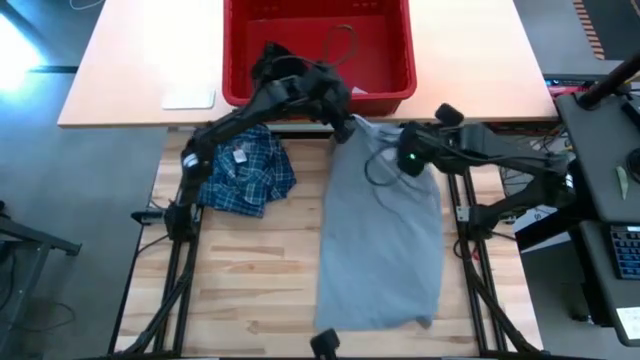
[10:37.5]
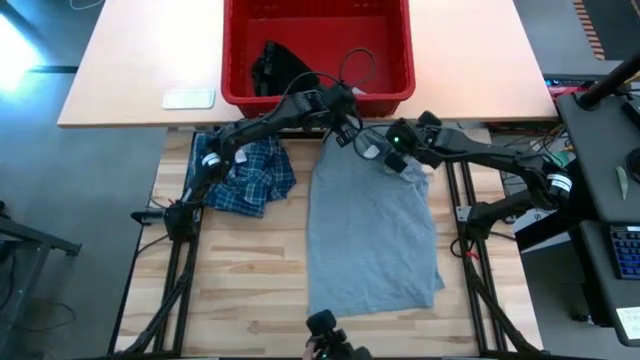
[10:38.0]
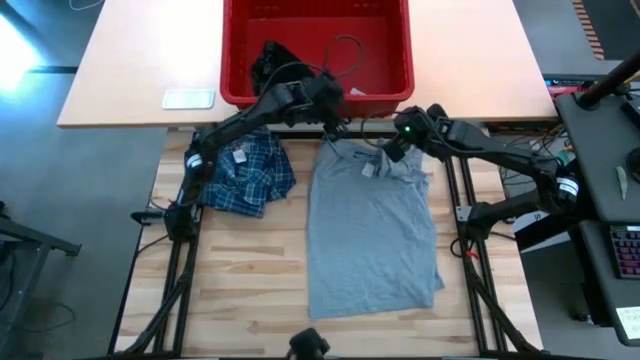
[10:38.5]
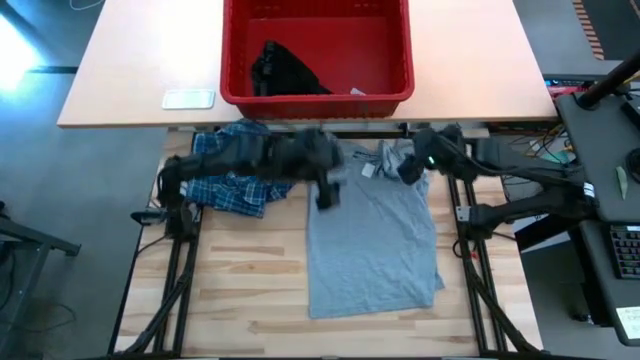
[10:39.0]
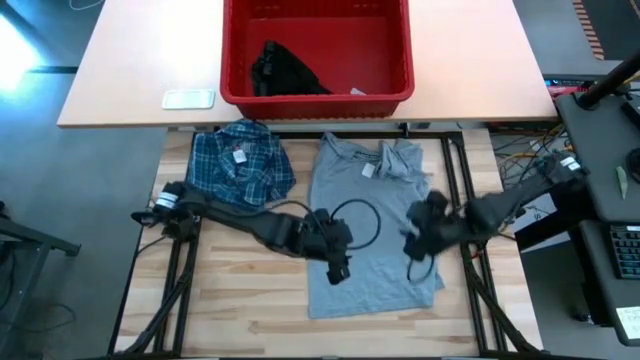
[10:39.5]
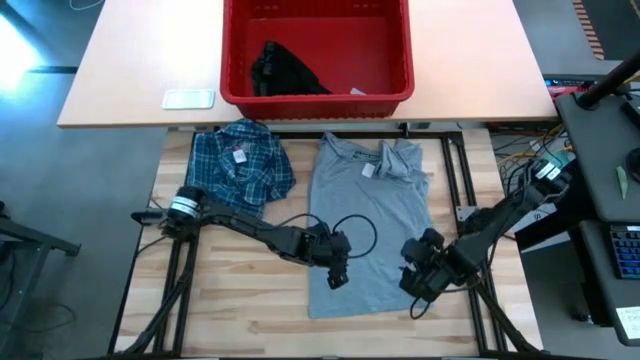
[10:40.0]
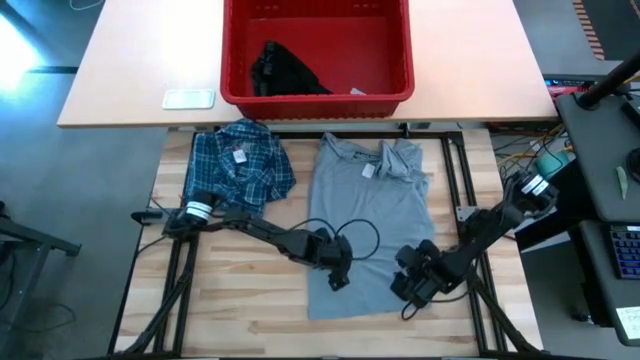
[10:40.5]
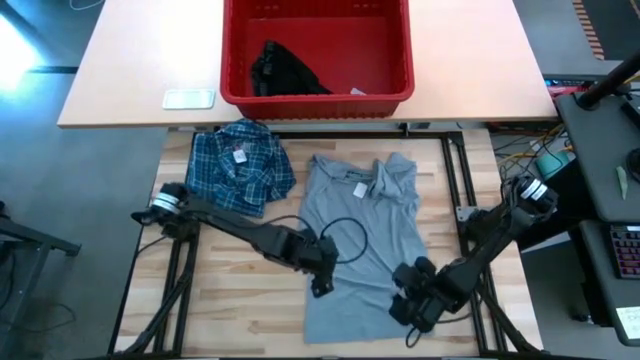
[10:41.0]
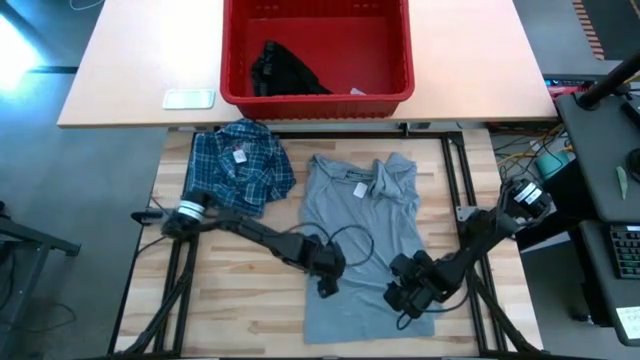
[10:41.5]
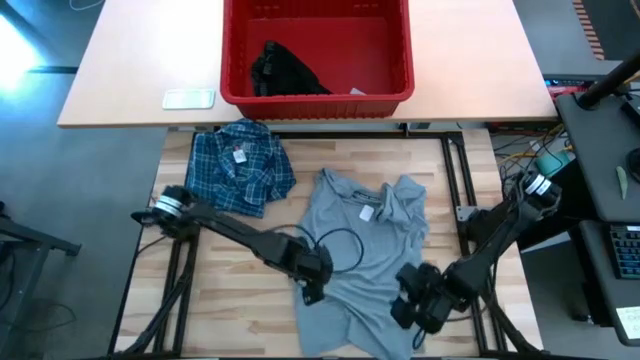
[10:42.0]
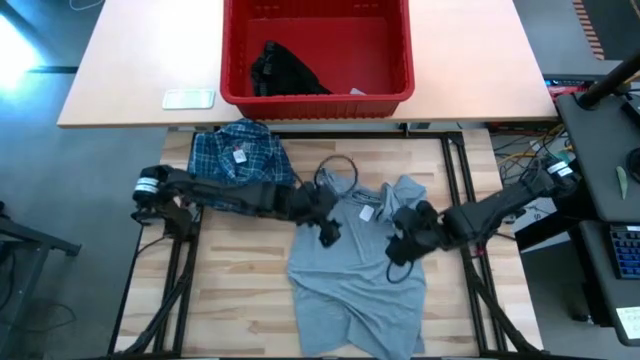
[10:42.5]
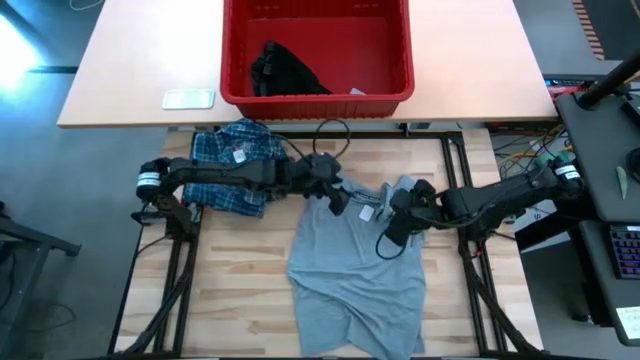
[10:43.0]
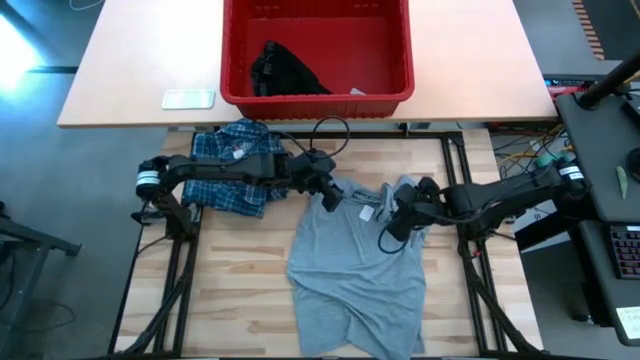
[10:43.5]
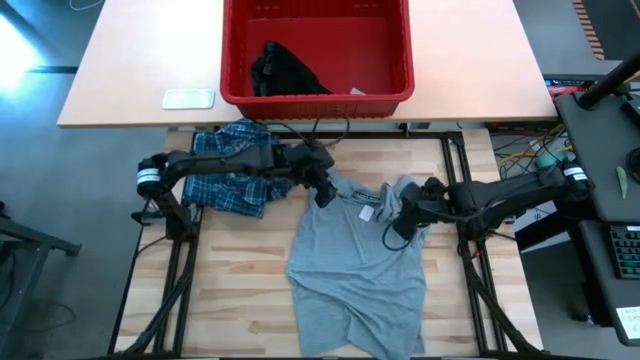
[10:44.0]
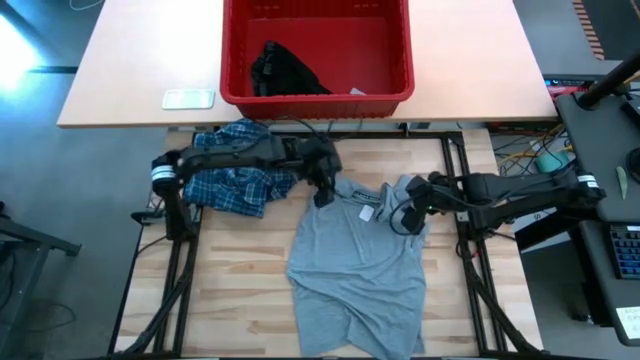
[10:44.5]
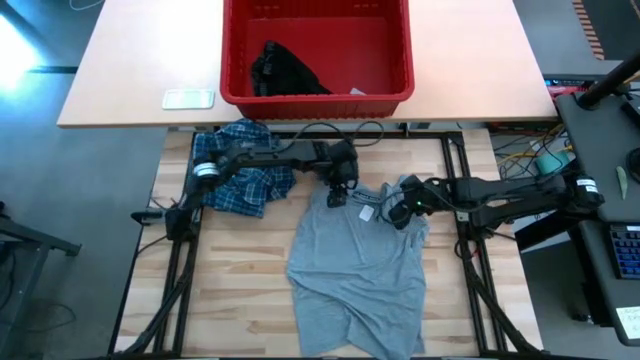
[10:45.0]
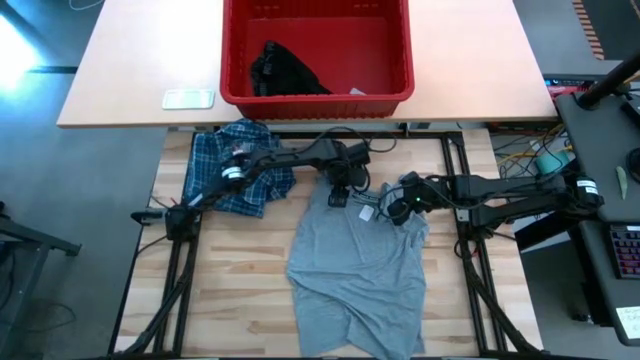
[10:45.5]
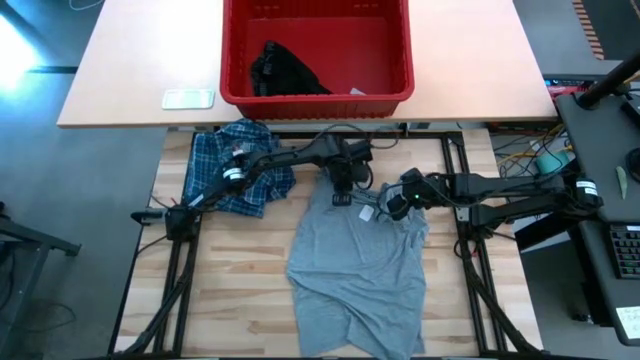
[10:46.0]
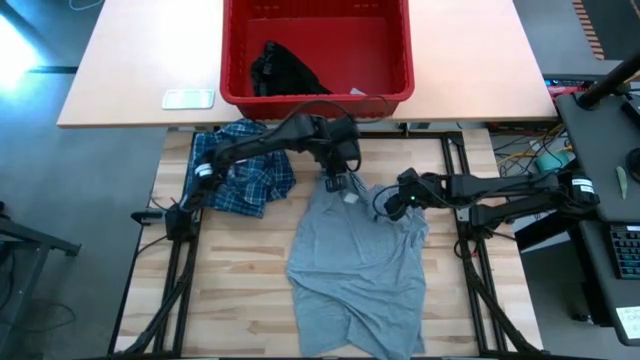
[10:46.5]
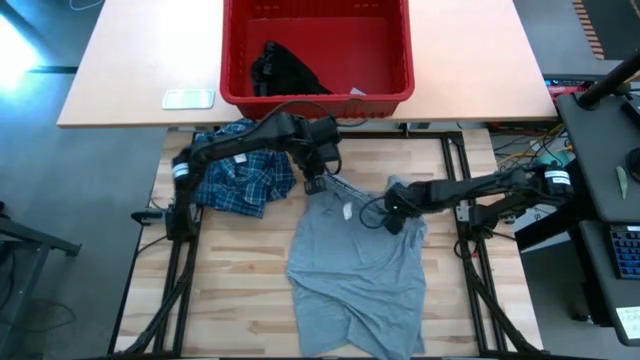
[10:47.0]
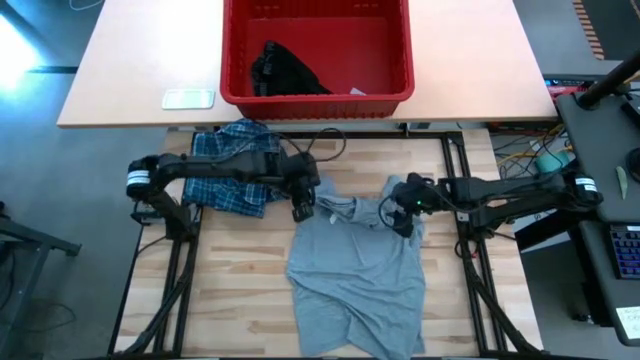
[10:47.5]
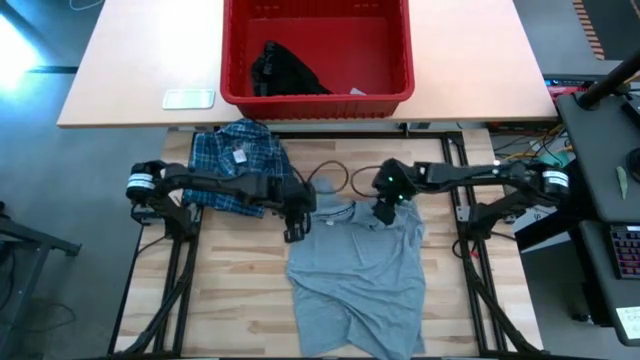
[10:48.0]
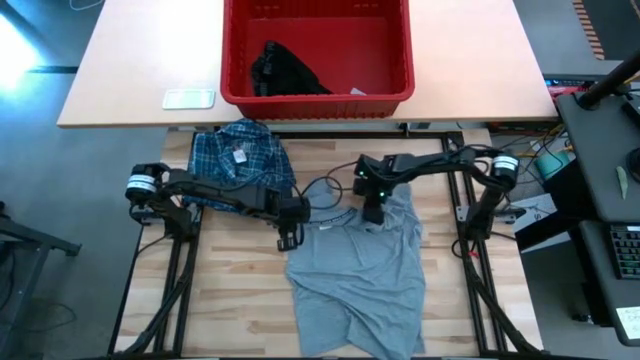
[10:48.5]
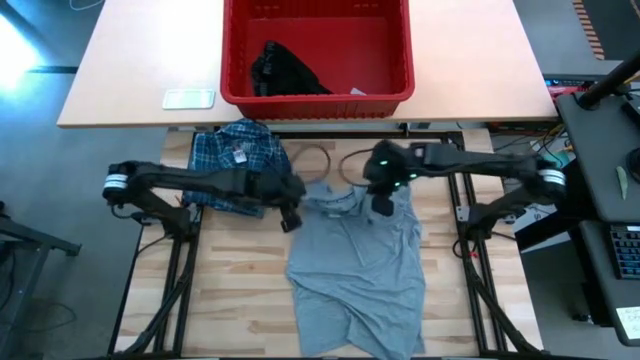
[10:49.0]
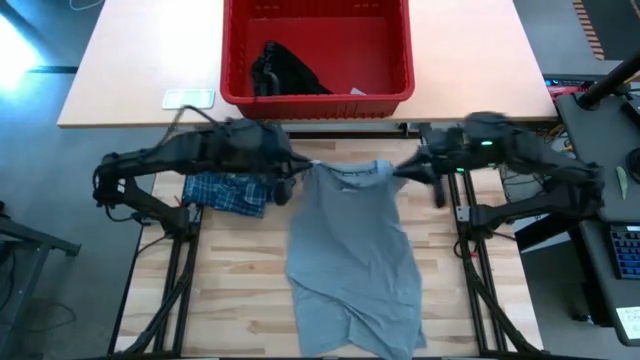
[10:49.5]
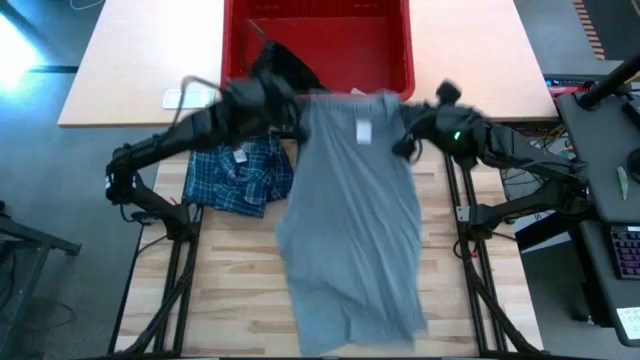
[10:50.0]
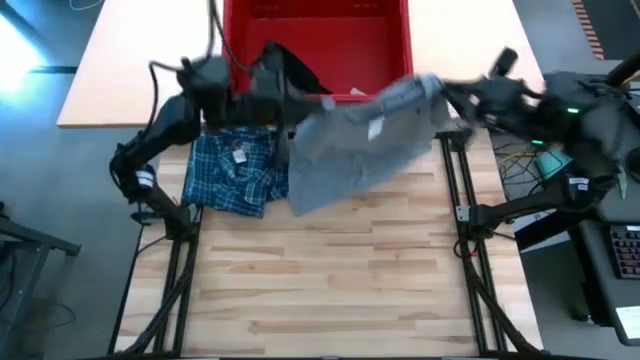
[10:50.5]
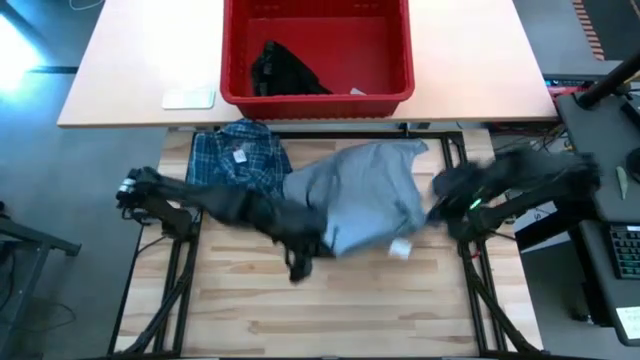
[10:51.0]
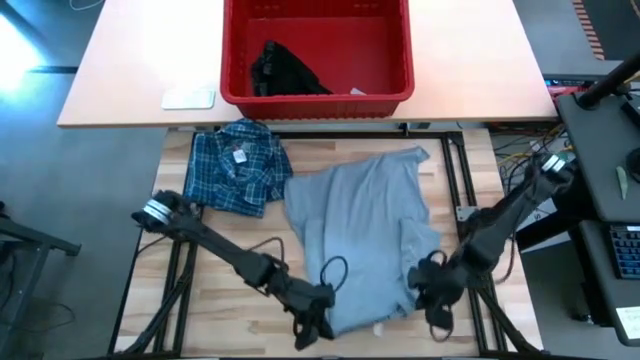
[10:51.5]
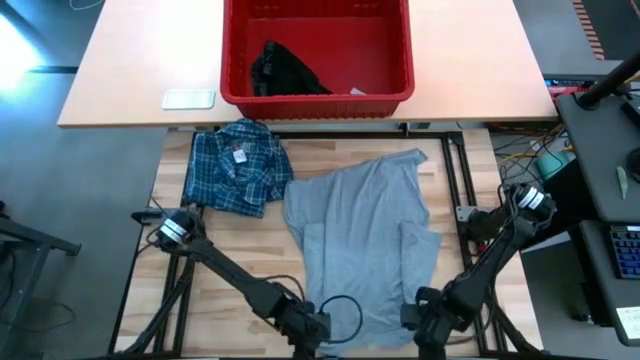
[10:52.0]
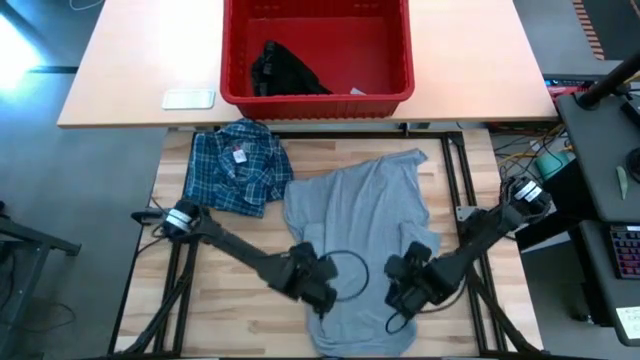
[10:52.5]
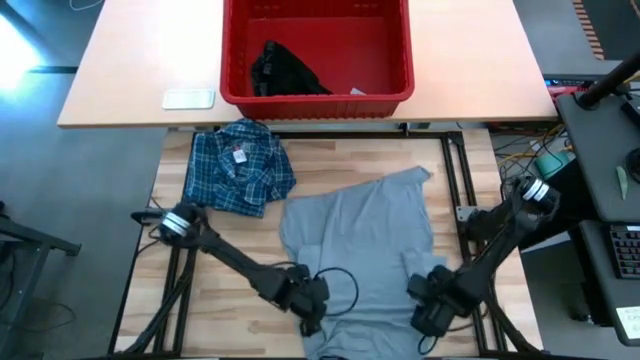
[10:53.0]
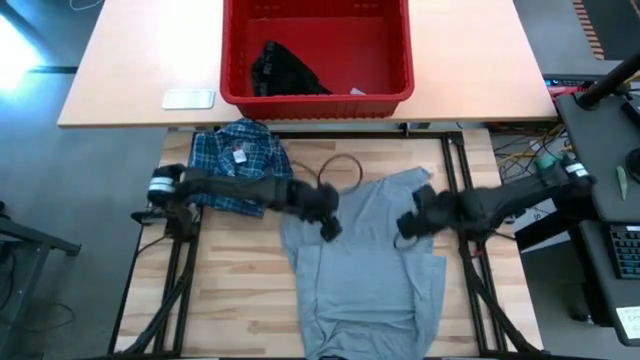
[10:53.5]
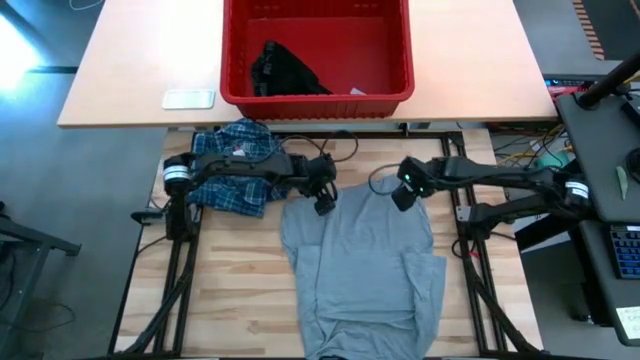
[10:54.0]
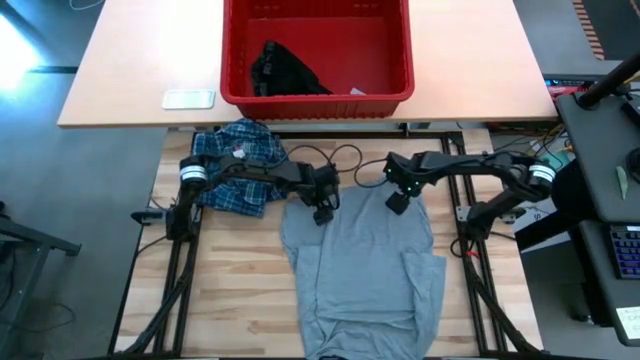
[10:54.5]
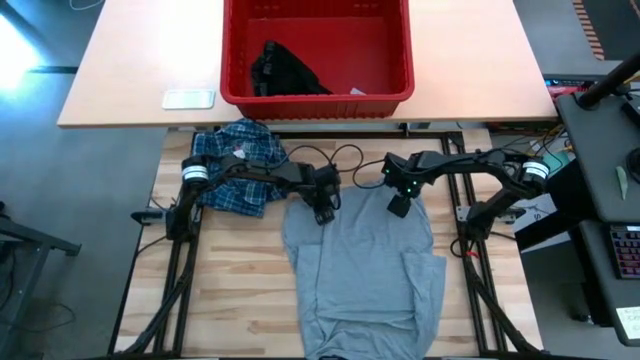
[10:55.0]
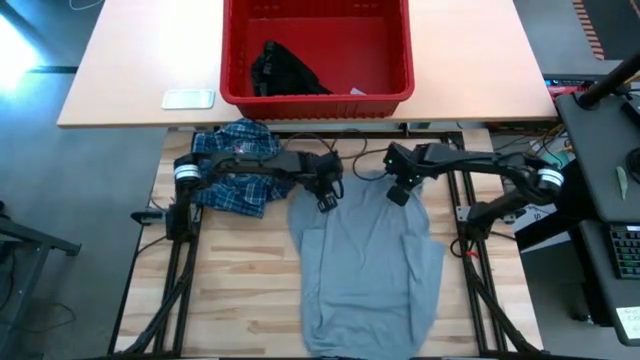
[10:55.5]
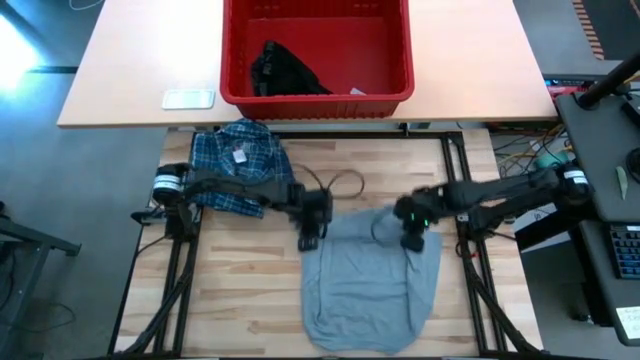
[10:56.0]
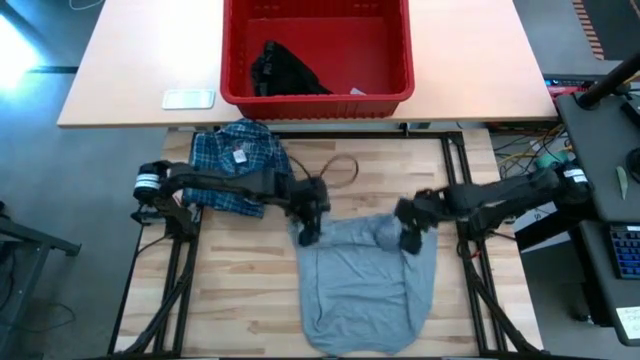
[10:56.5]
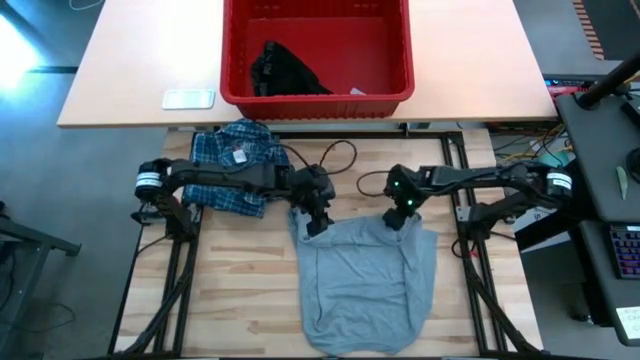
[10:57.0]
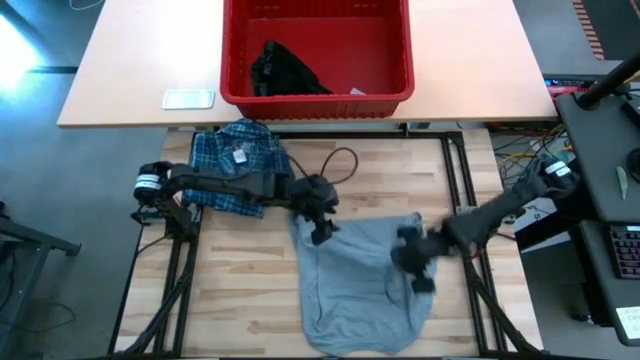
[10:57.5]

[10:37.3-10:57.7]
Task: Fold Laundry from Bin
Fold the gray shirt

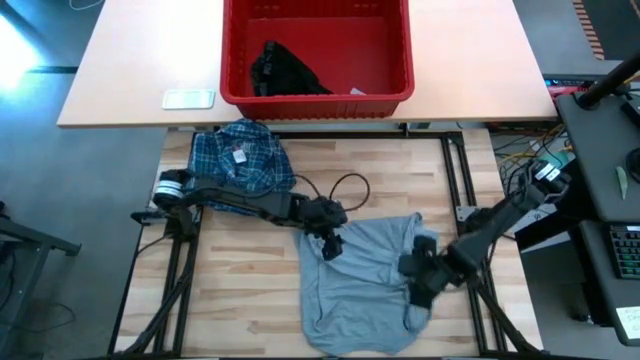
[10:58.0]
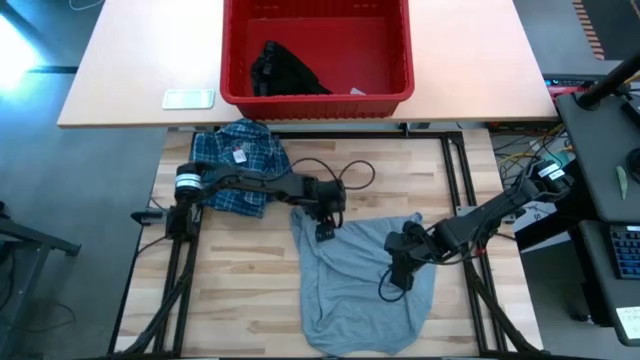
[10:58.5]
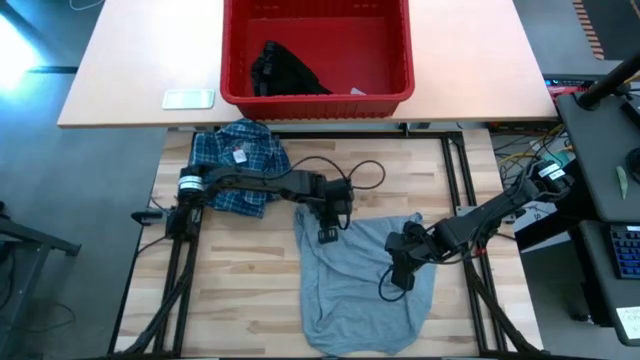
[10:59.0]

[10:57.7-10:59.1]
Fold the gray shirt
